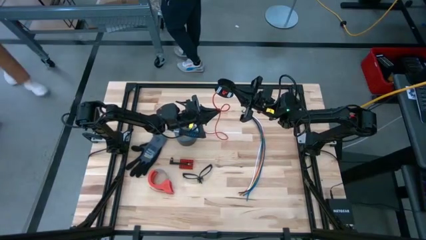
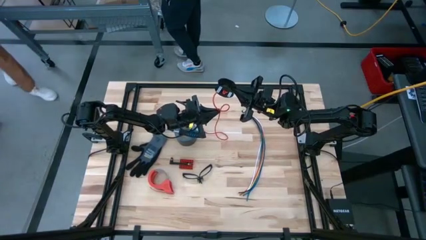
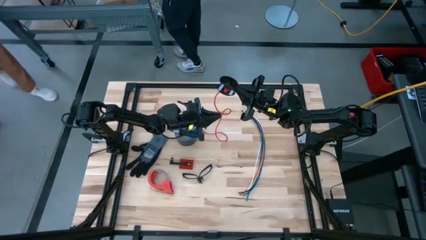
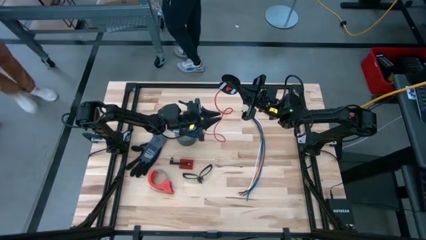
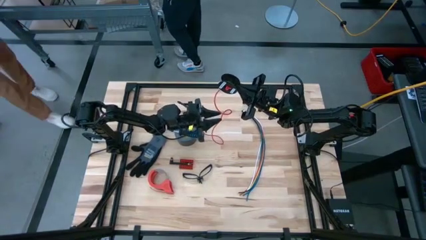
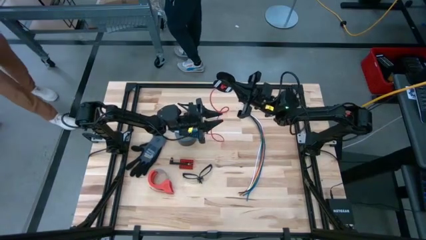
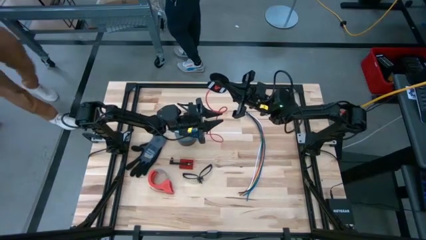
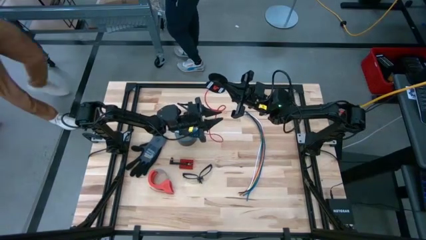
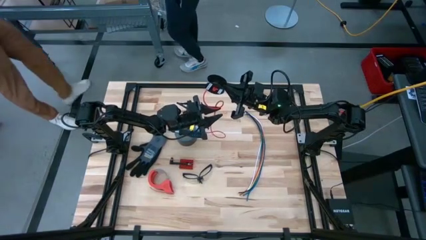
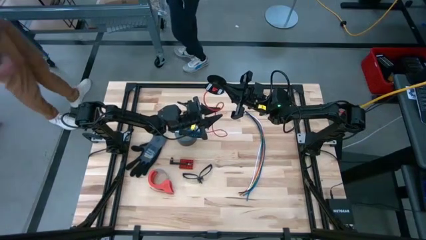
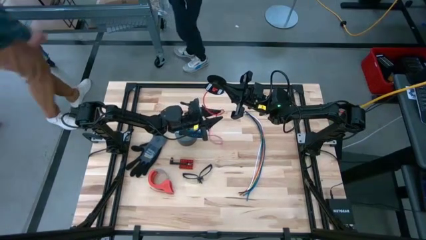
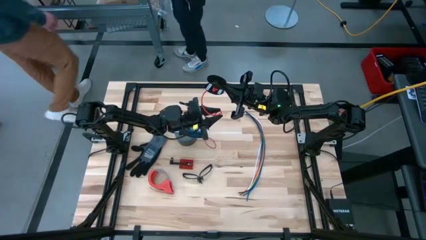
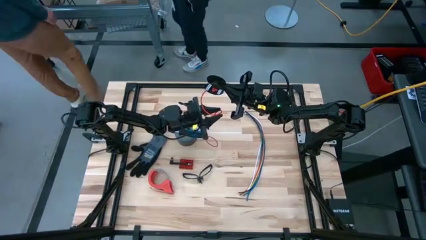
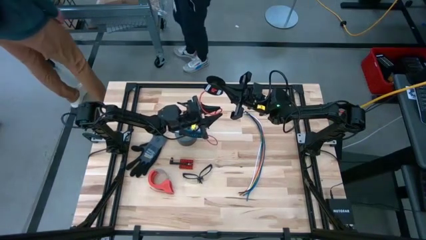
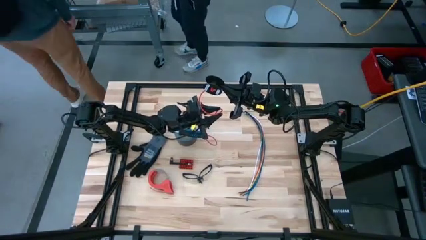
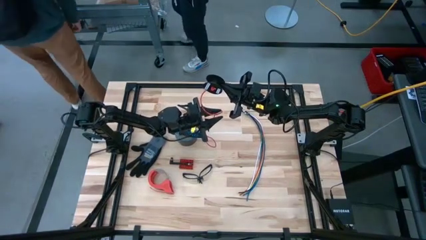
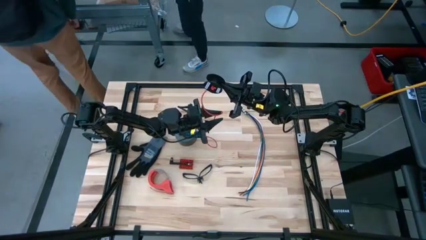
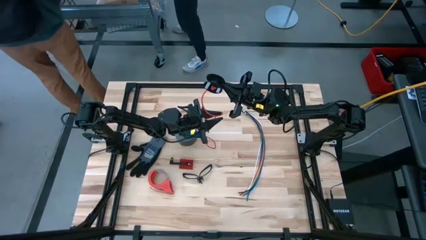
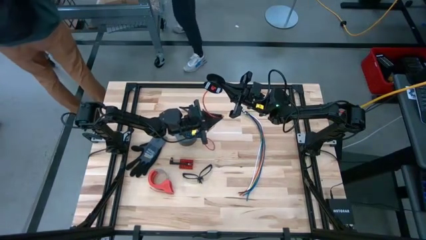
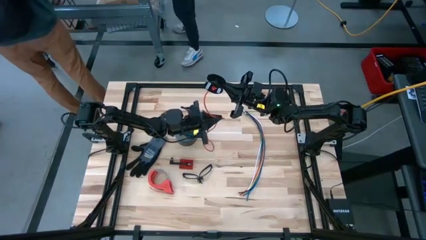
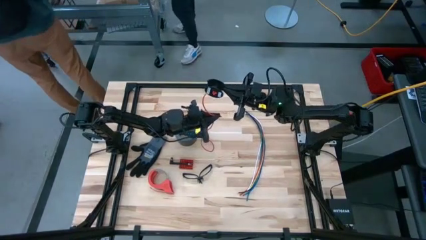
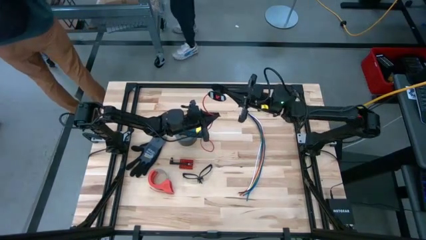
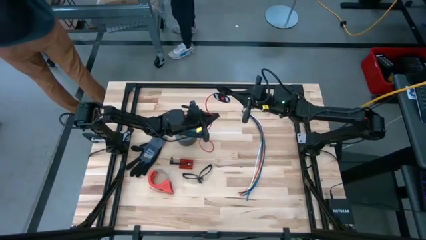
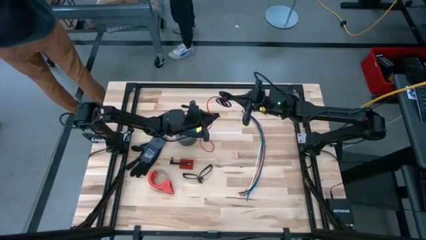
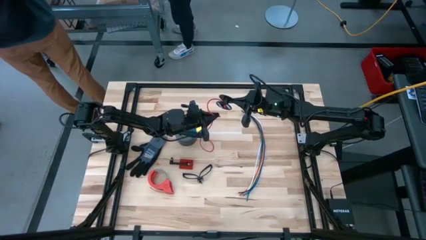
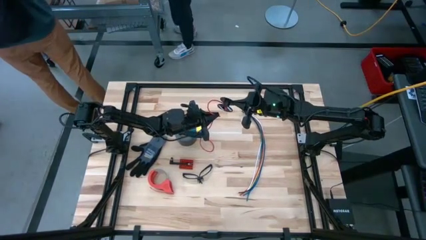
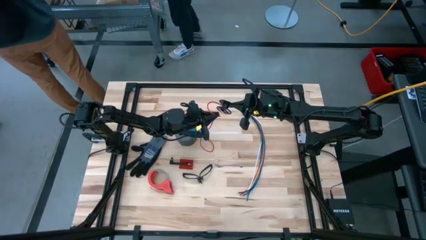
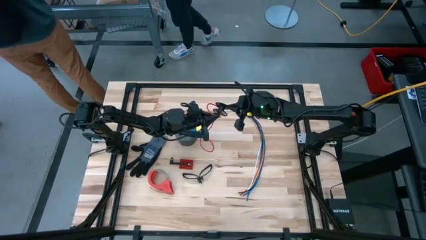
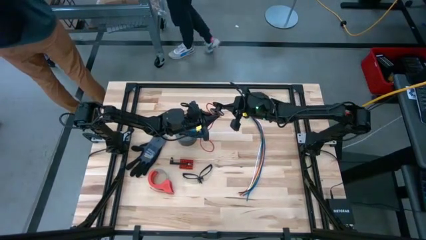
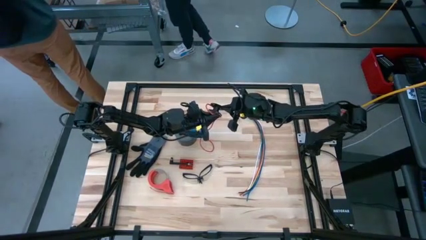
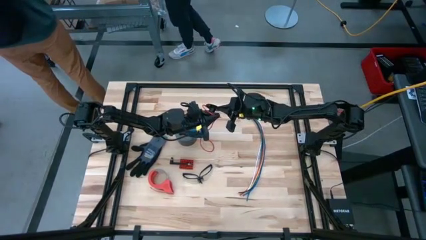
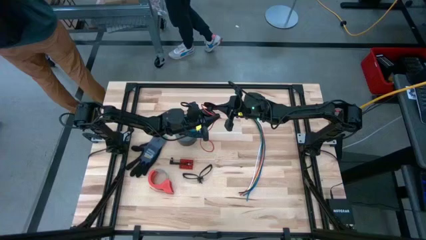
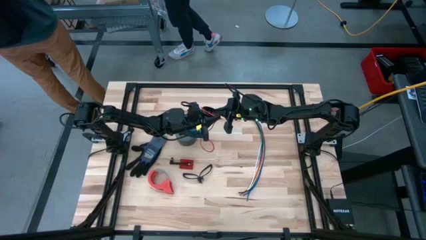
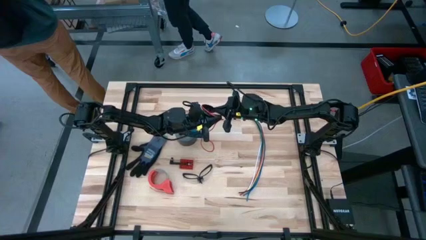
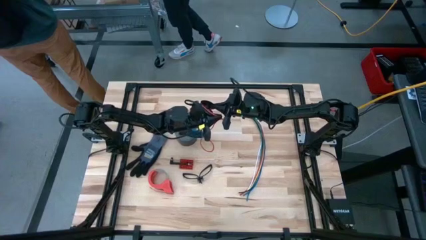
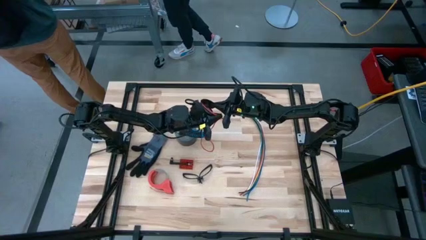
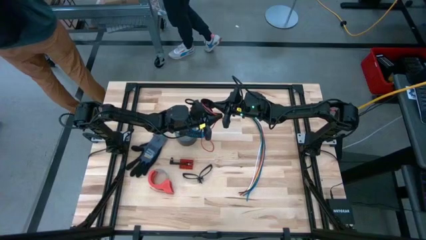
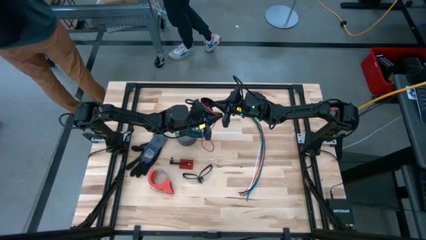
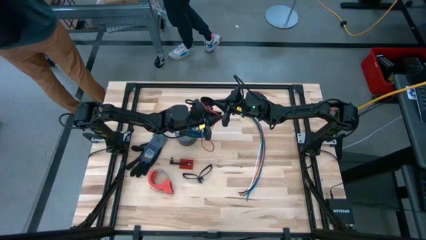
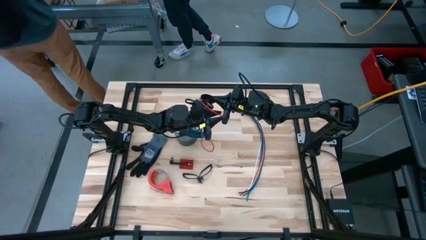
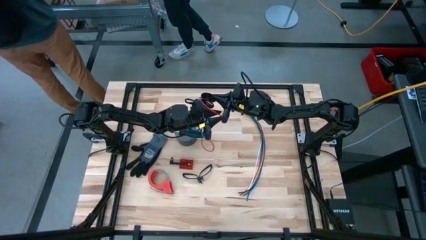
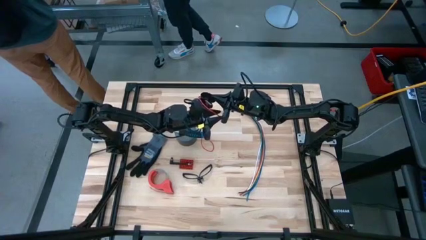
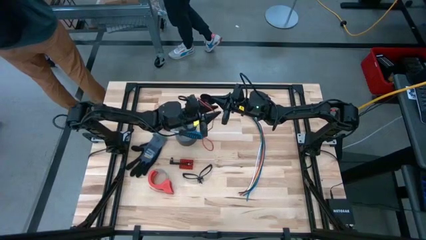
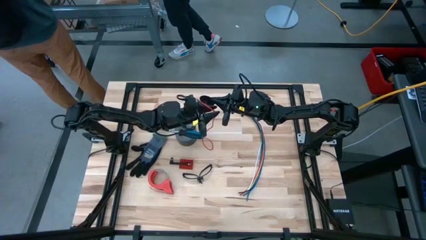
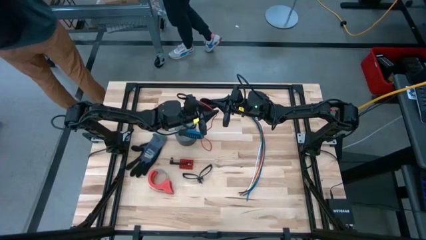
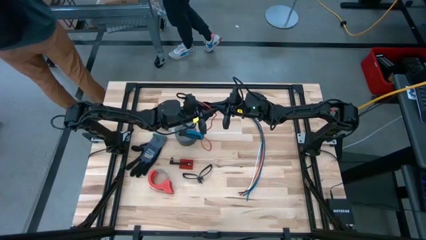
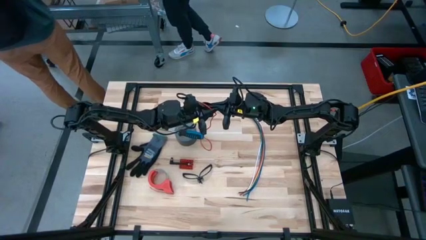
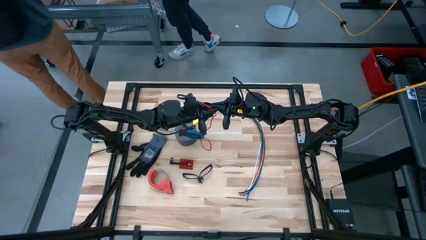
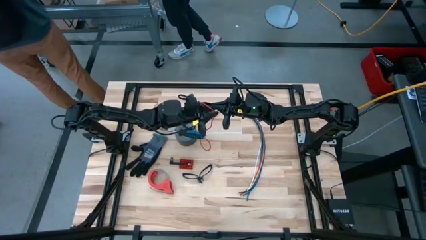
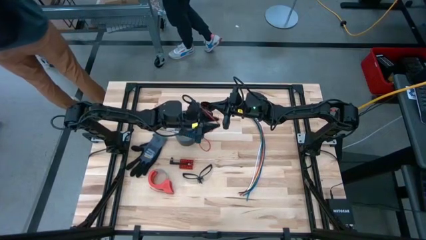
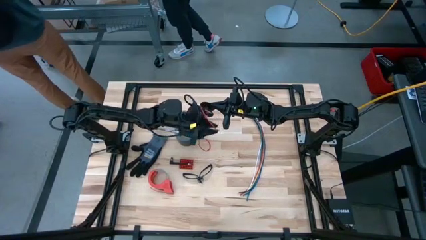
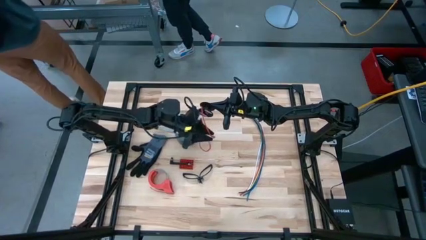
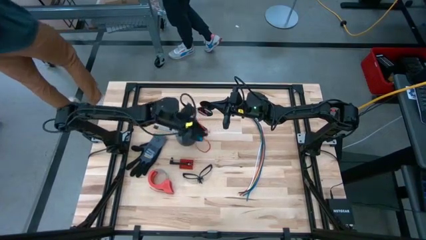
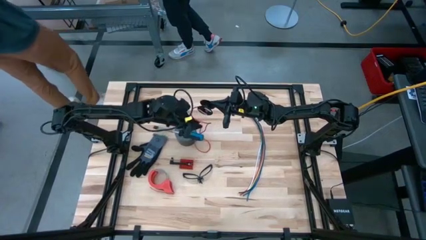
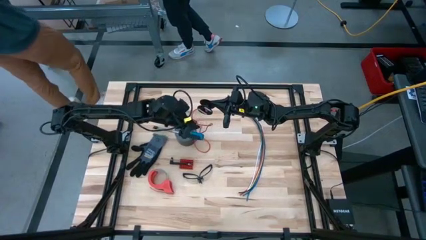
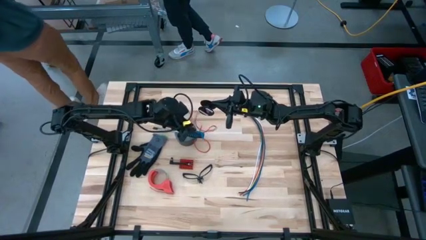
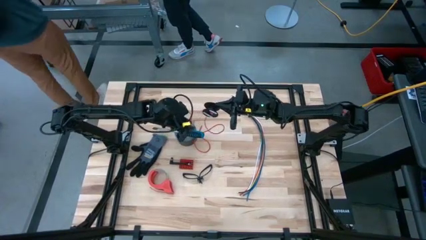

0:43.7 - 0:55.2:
Task: Coil cords
Coil the red wire into the black spool

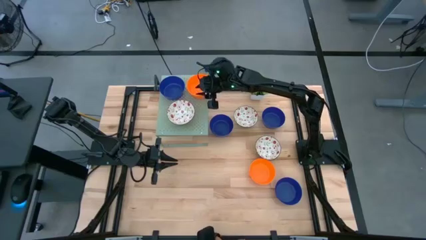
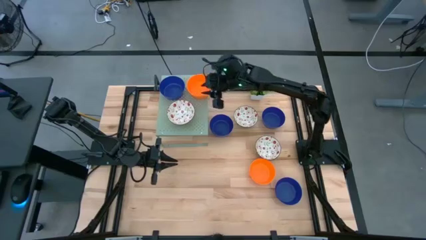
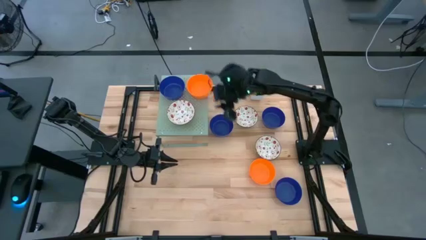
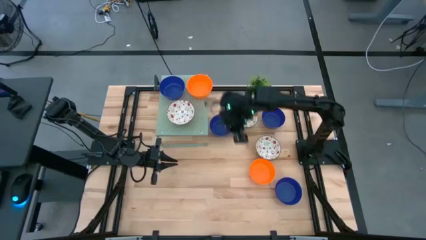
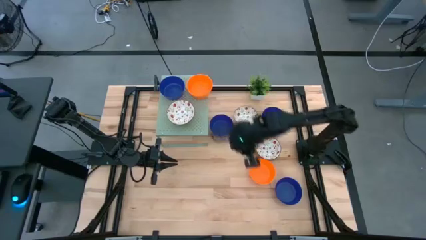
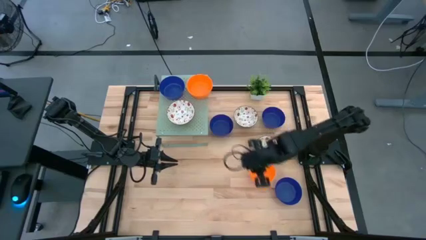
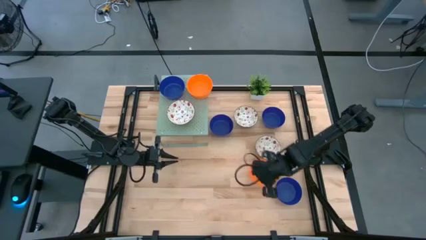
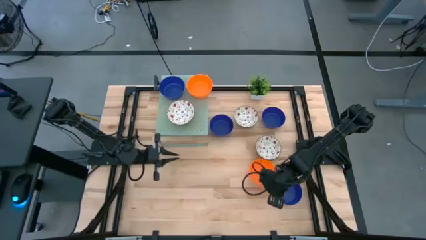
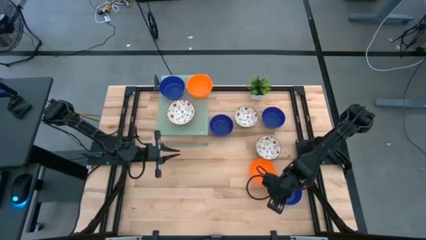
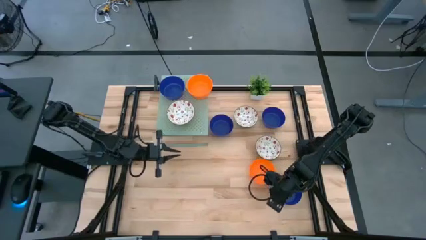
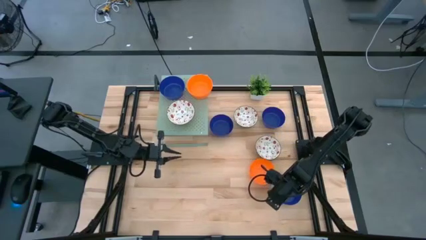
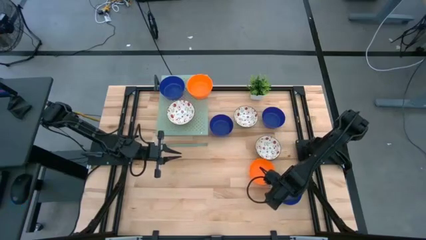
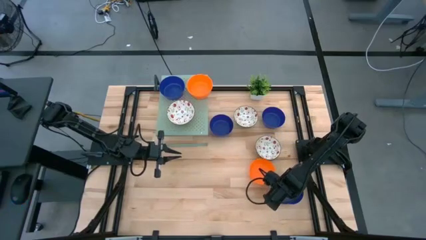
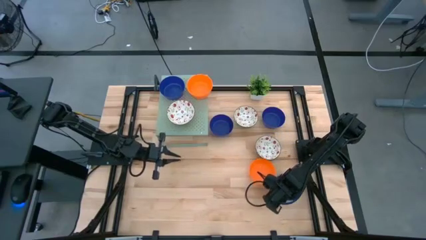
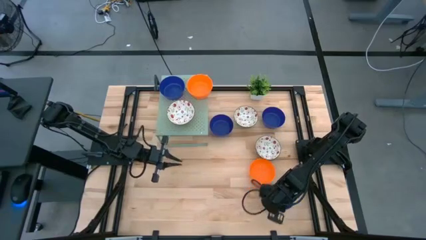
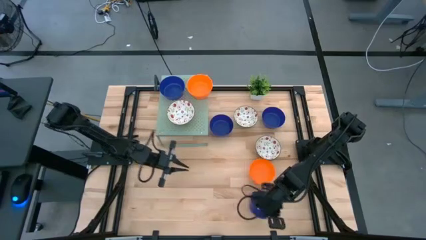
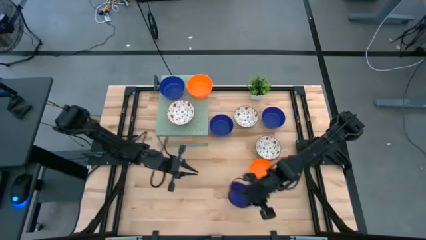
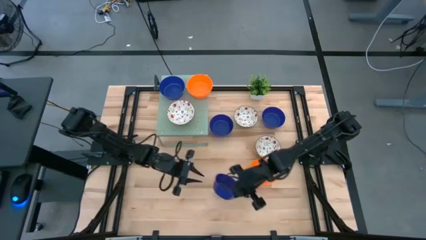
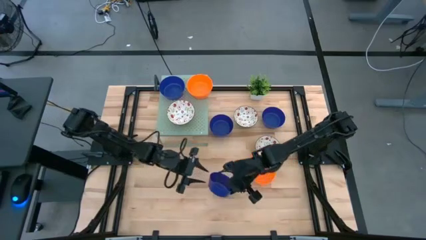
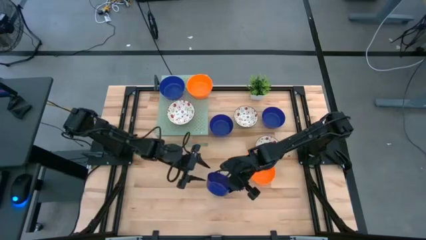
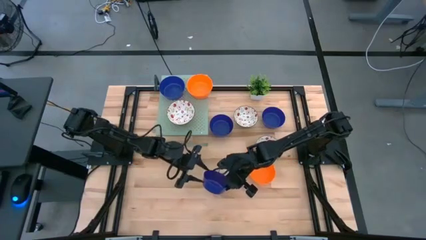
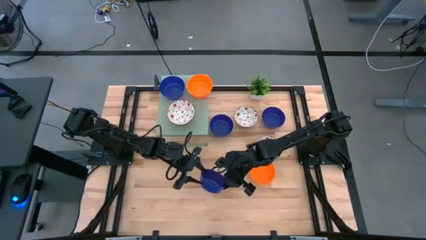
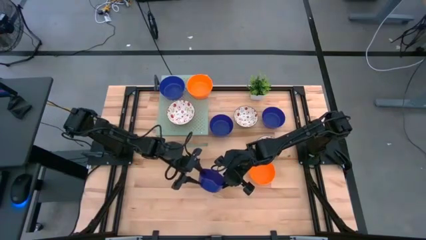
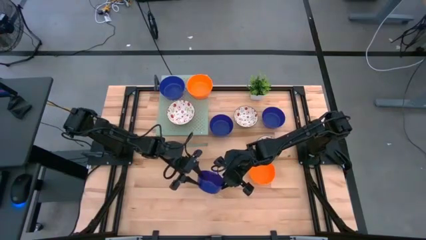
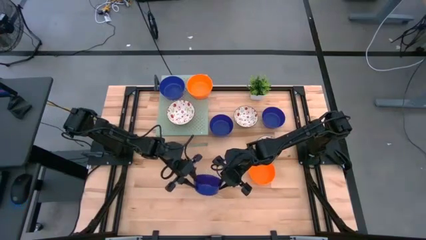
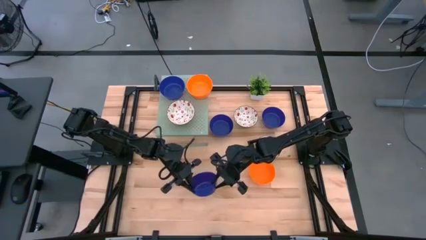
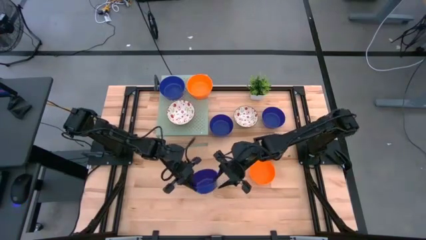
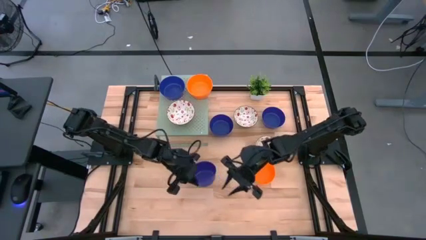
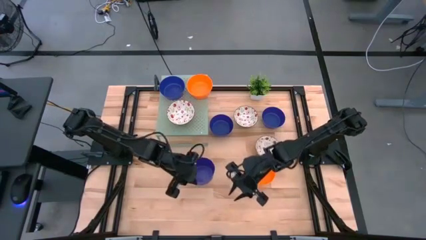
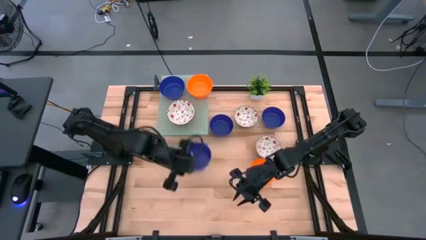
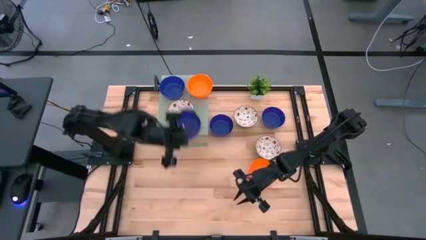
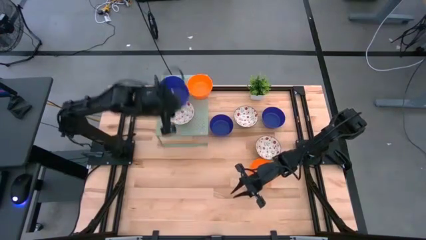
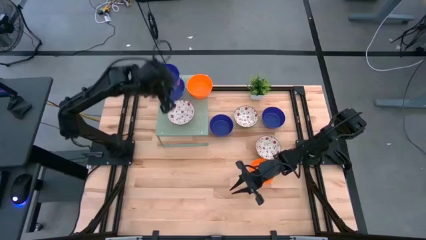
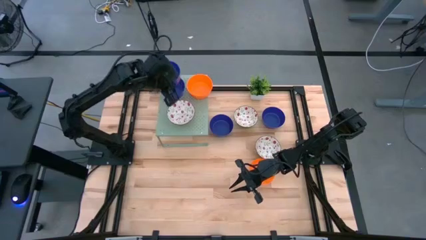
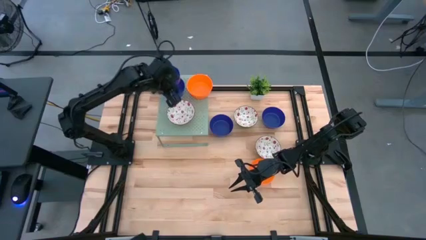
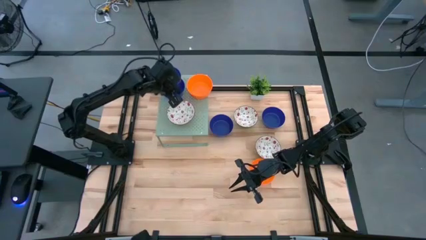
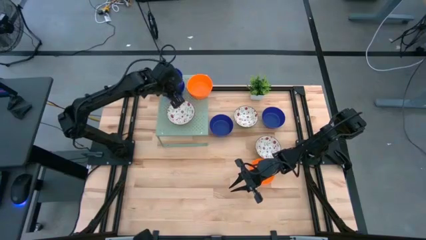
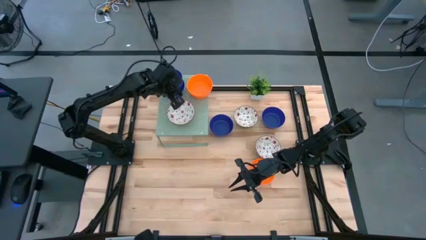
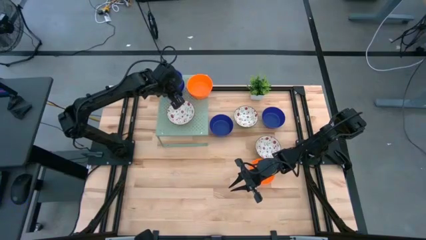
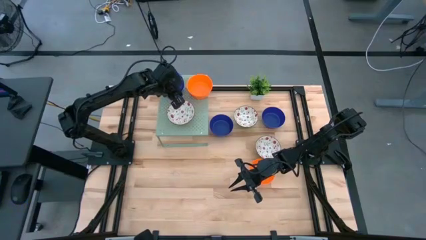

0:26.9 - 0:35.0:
Task: Pick & Place Mini bowls
Stack the bottom right blue bowl on the other blue bowl on the shelf
